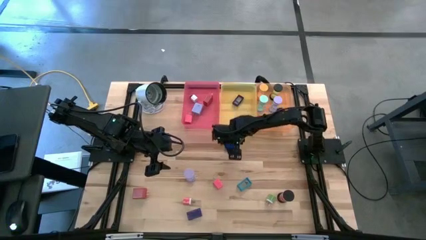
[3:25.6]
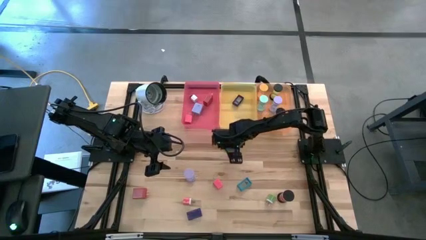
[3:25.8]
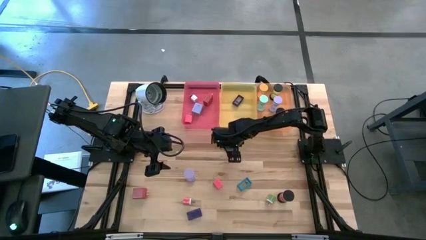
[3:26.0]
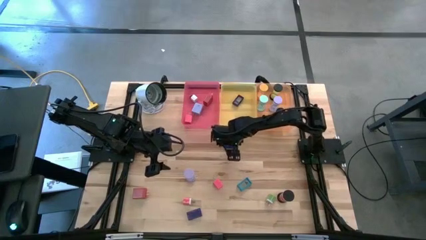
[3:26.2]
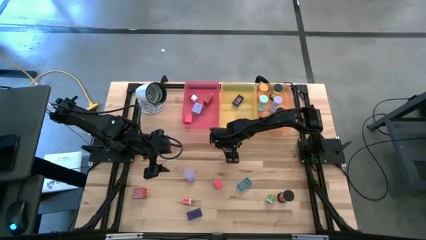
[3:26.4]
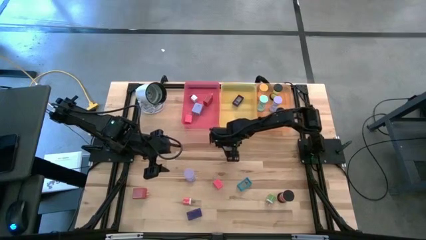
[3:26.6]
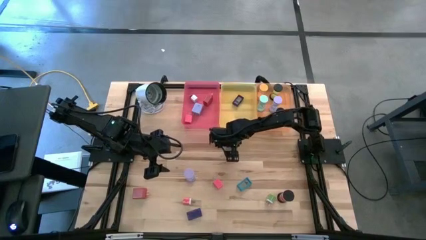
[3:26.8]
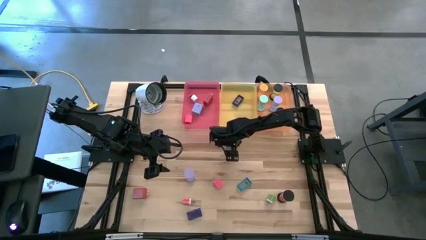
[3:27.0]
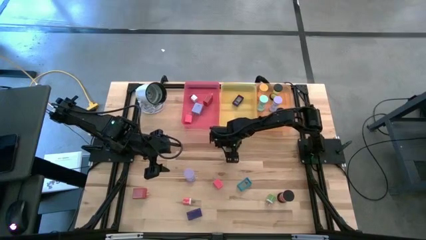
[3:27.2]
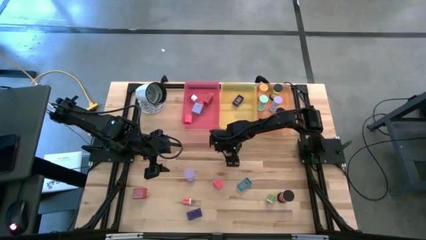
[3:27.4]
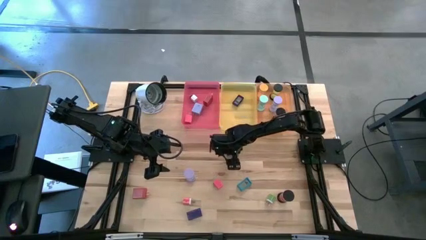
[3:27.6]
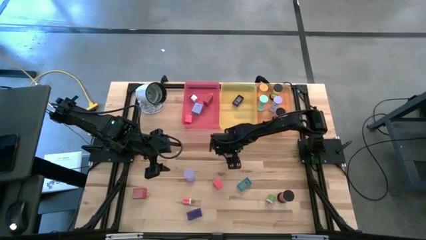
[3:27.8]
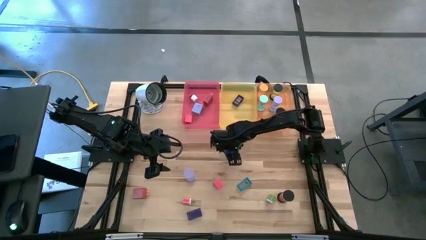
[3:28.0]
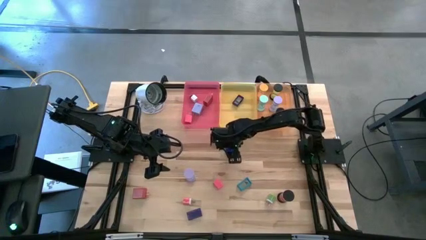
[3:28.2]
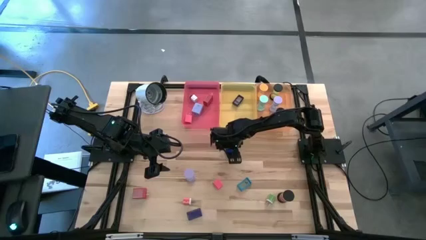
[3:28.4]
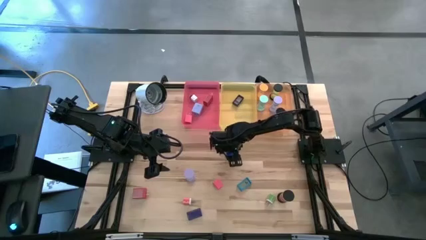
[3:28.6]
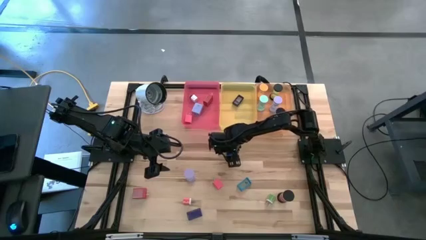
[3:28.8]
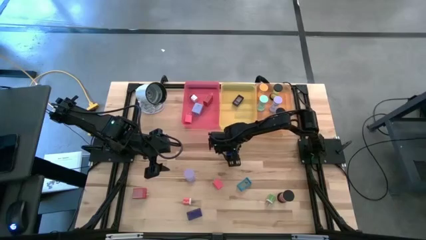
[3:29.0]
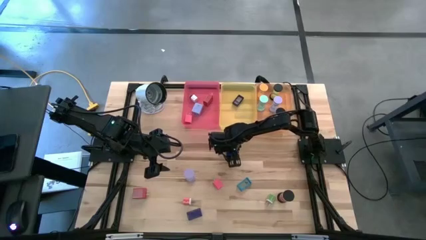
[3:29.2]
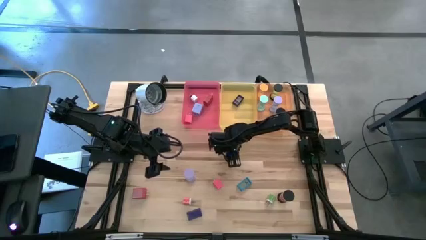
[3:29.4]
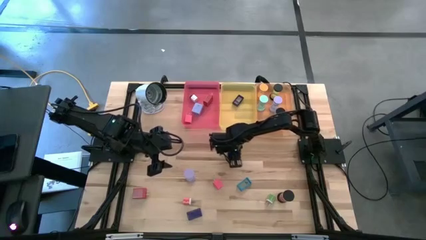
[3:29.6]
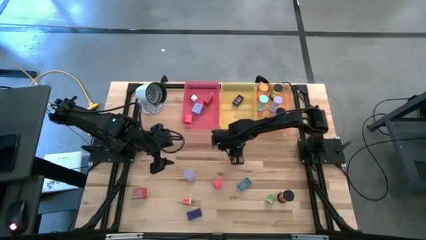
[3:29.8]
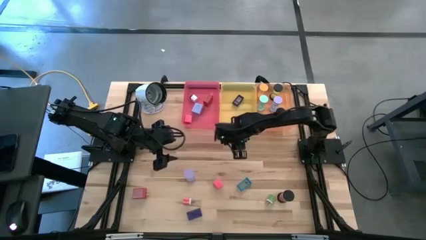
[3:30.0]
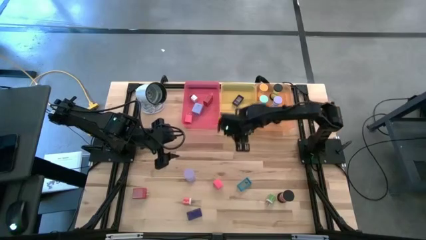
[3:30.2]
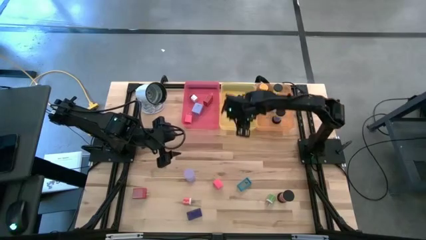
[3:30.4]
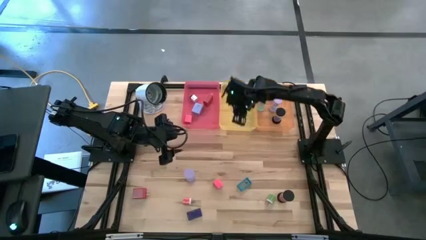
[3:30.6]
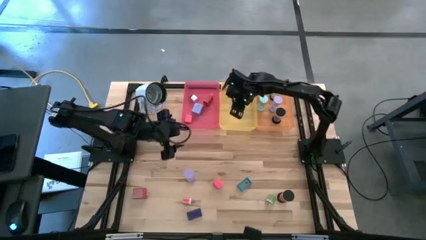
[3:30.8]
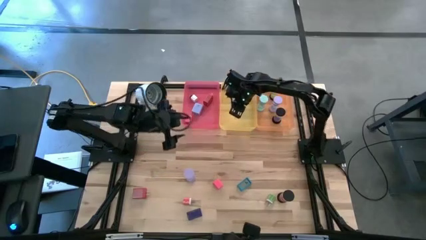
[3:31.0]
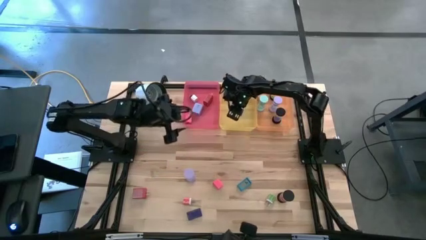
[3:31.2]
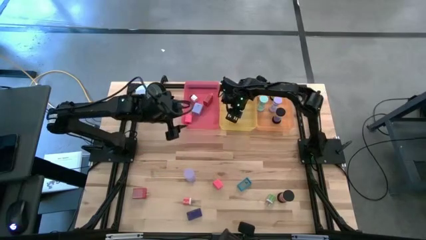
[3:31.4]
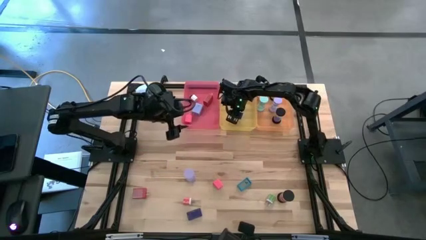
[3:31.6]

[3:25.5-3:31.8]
Task: Pick & Place Office items
Put the blue digital clock into the yellow bin

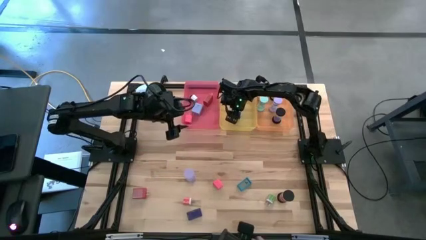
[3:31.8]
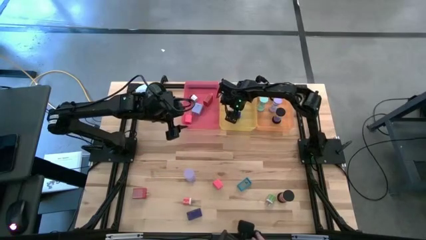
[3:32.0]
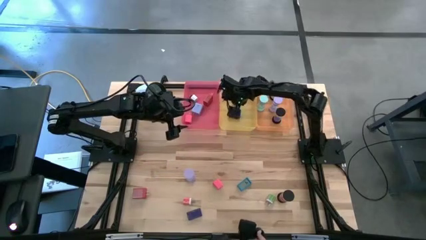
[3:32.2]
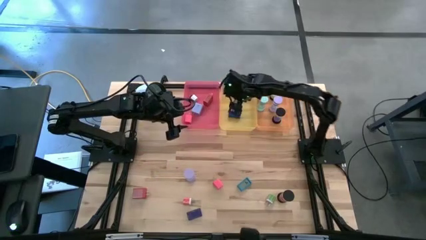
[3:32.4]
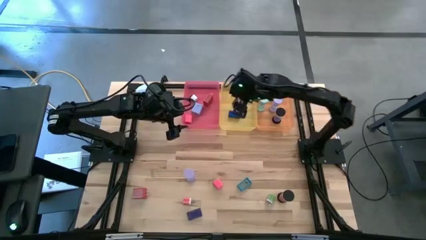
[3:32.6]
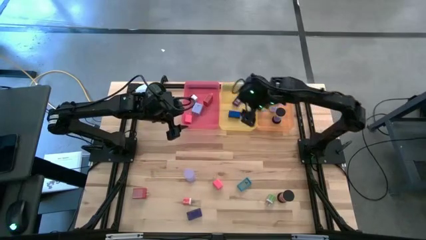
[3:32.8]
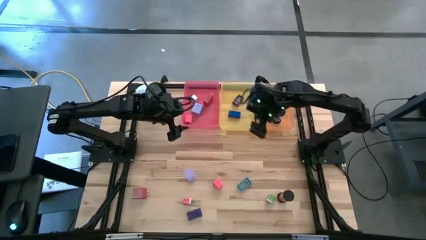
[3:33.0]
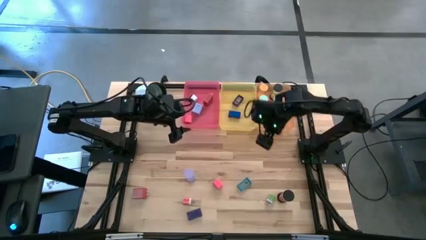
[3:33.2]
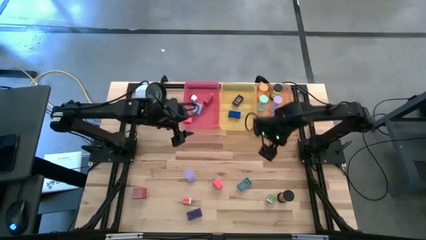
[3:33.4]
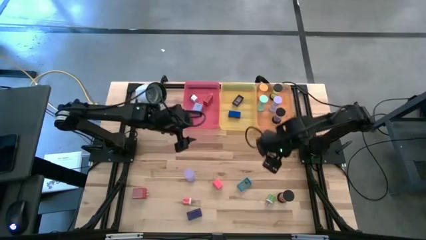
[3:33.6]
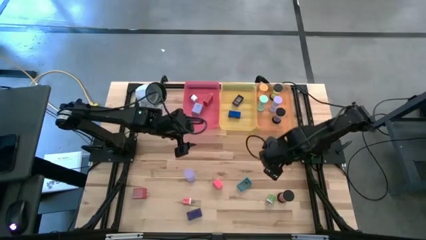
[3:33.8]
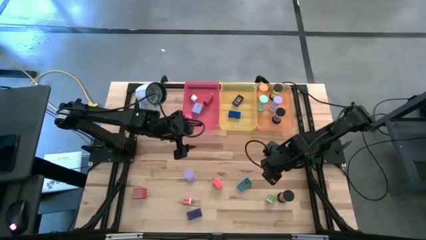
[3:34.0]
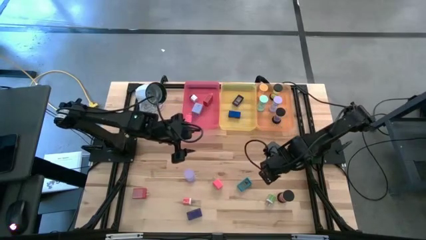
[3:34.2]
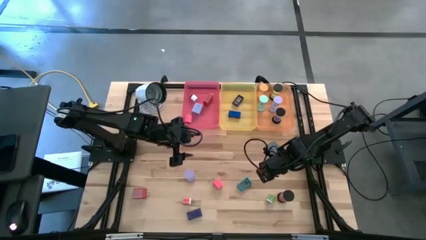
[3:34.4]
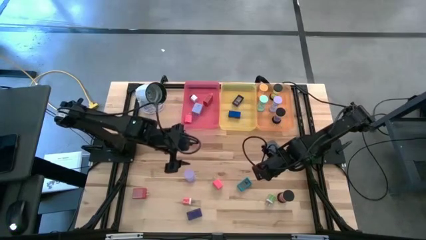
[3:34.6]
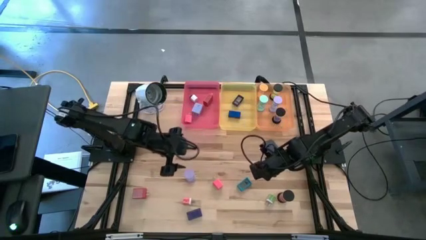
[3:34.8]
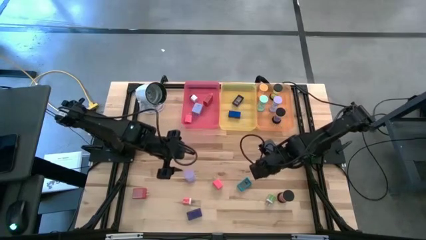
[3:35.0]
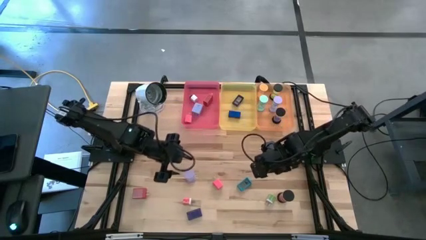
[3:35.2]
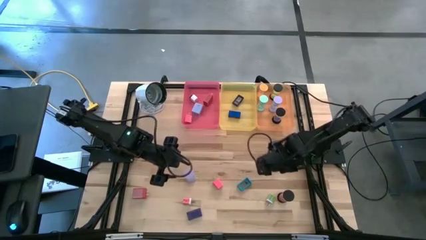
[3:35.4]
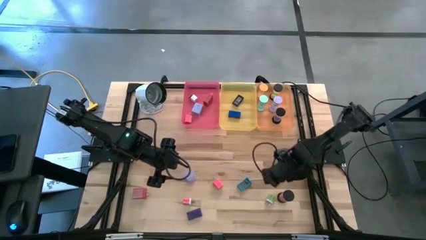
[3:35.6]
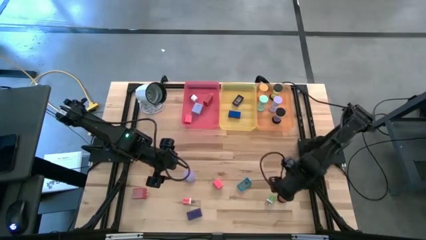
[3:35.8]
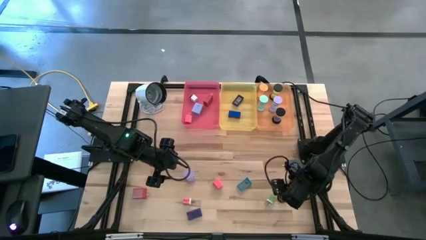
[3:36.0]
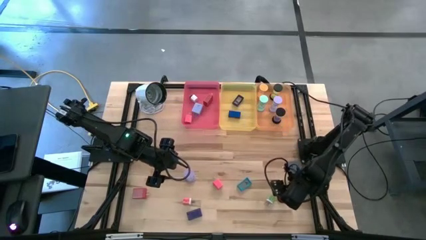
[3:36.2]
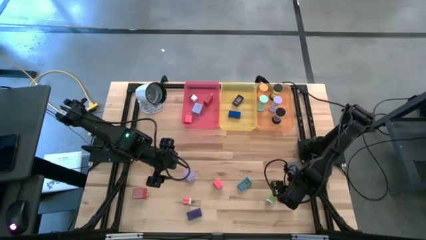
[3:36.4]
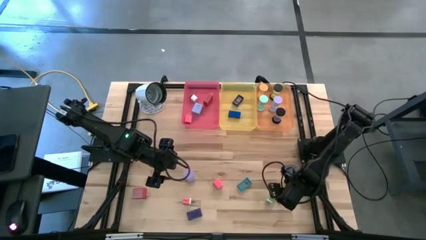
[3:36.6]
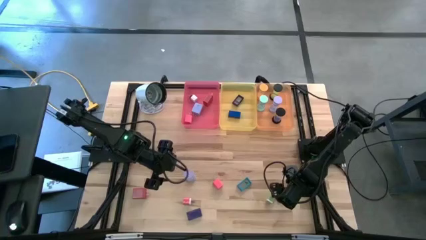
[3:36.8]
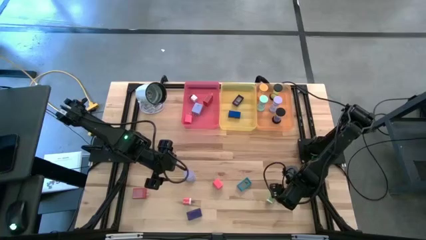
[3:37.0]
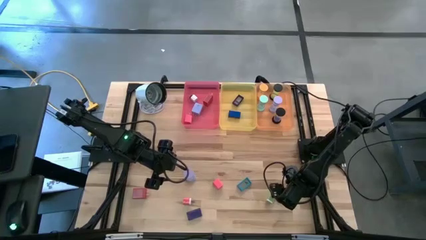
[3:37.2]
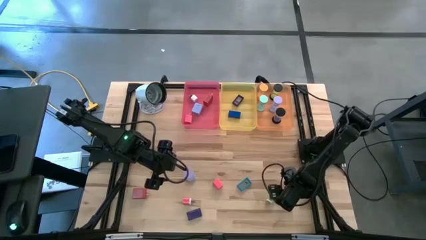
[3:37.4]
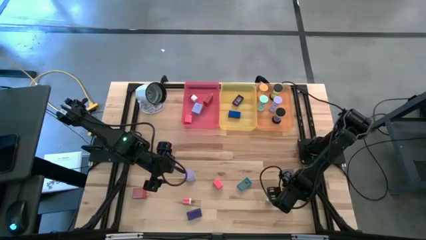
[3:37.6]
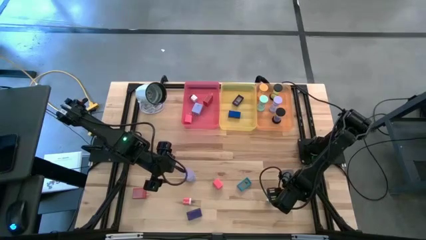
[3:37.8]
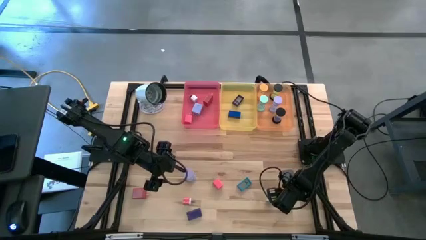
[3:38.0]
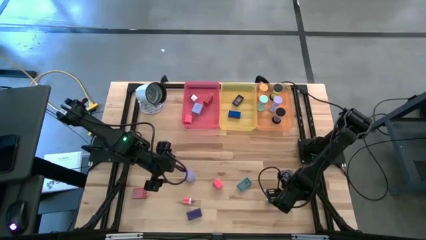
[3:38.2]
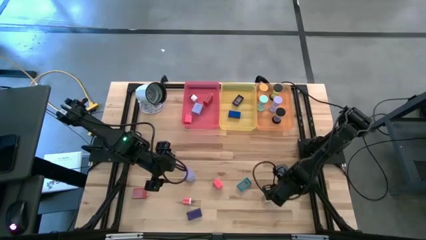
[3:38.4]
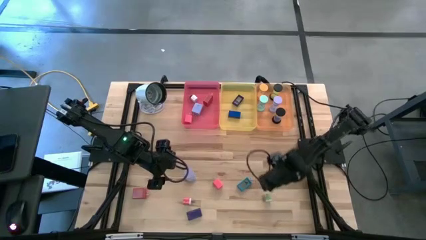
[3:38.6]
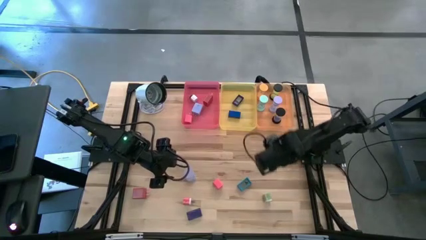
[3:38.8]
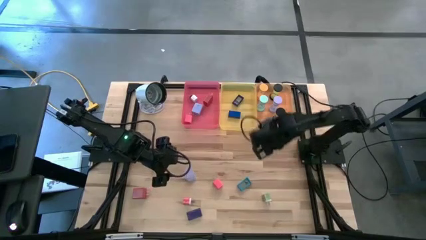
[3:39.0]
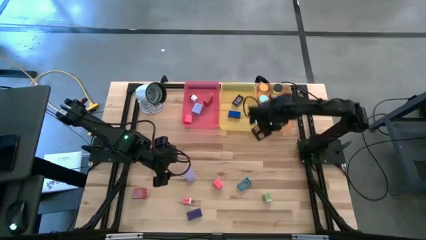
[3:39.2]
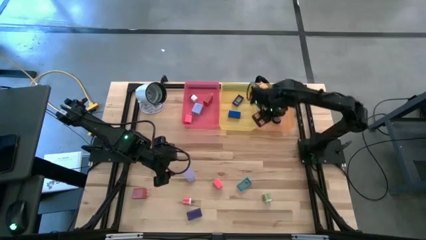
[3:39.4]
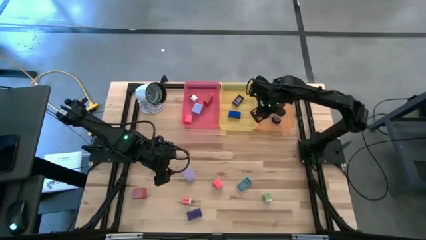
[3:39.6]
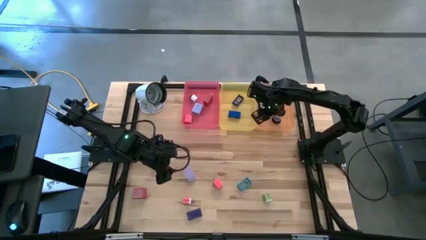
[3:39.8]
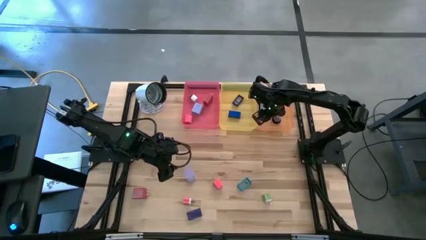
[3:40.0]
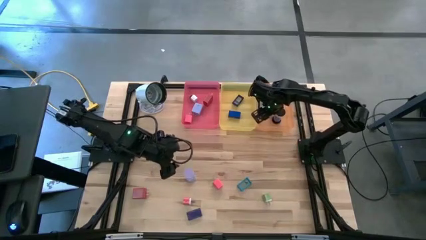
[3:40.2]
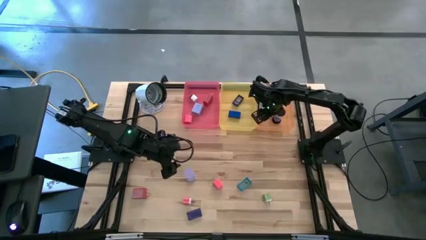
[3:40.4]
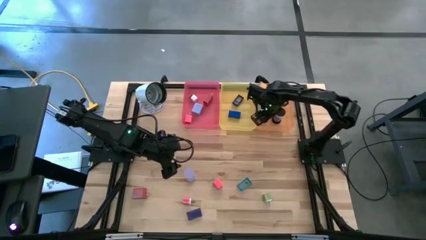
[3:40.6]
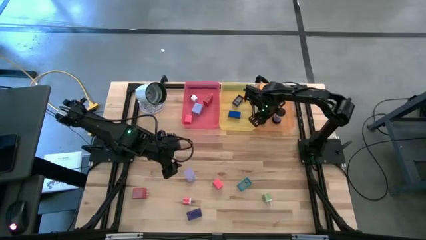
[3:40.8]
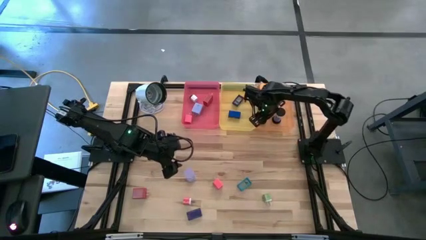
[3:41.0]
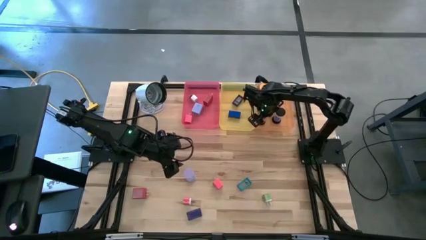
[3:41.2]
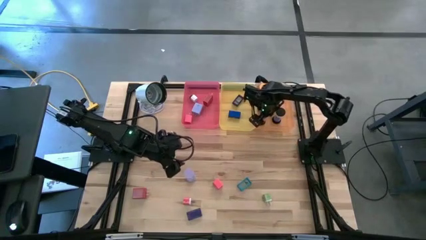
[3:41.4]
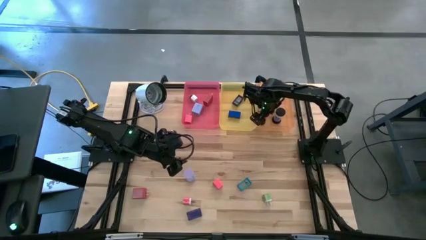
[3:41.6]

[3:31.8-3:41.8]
Put the black red hourglass into the orange bin
